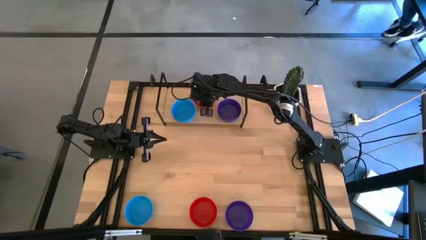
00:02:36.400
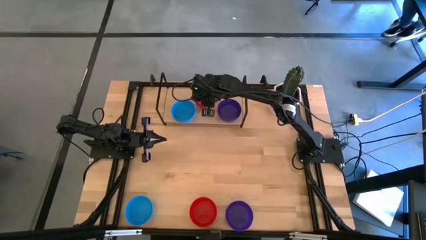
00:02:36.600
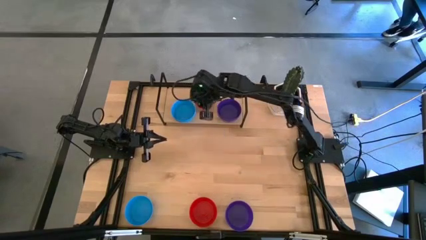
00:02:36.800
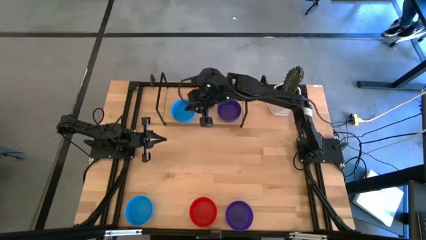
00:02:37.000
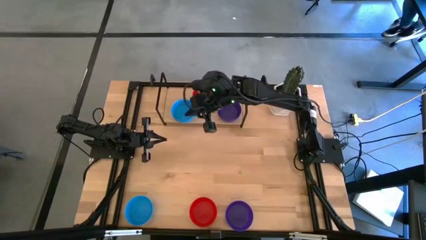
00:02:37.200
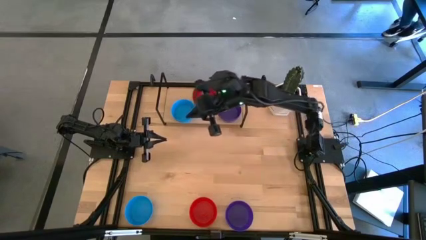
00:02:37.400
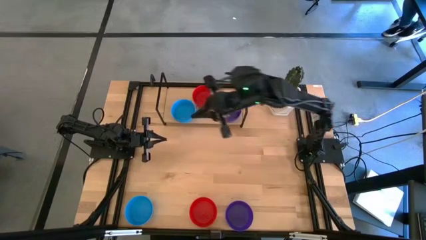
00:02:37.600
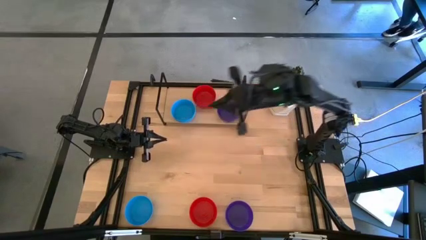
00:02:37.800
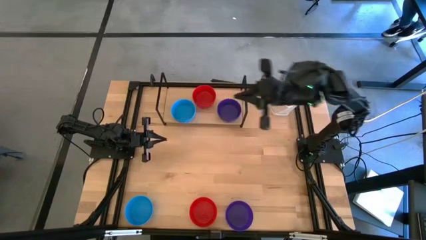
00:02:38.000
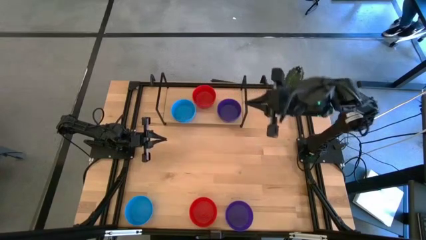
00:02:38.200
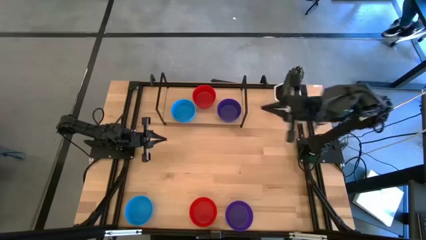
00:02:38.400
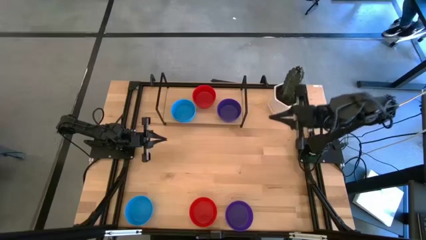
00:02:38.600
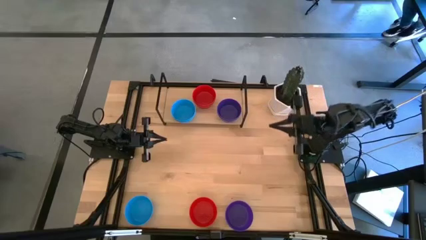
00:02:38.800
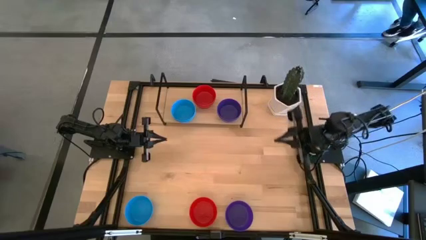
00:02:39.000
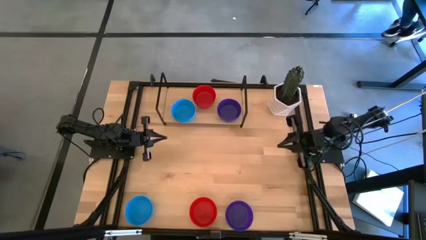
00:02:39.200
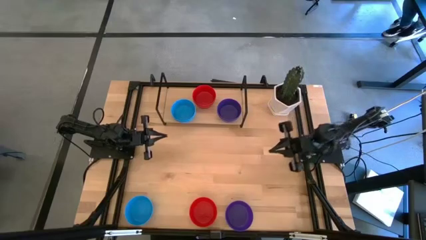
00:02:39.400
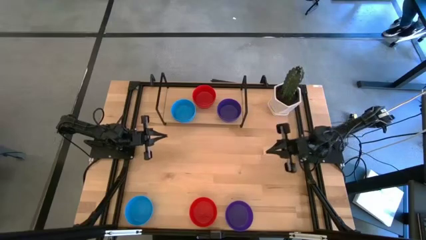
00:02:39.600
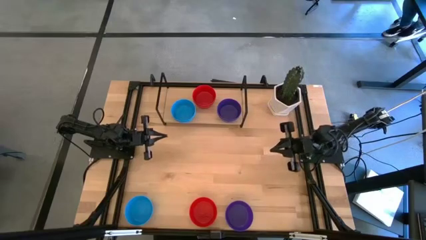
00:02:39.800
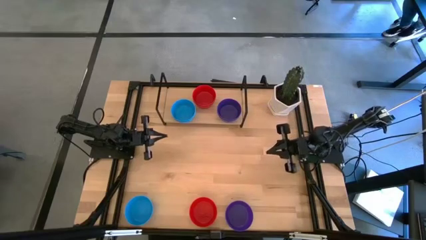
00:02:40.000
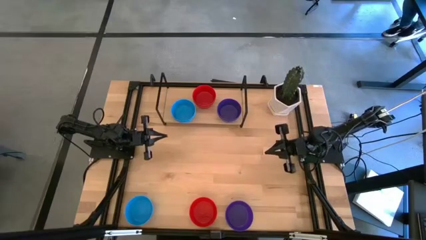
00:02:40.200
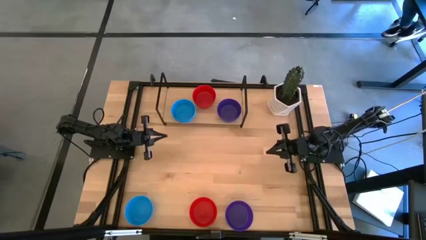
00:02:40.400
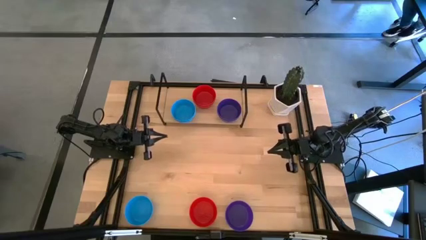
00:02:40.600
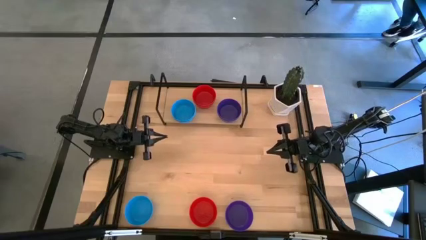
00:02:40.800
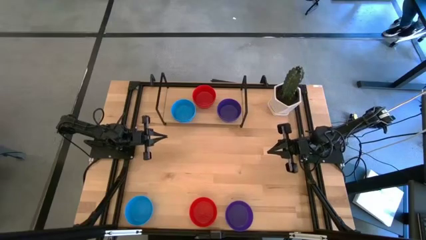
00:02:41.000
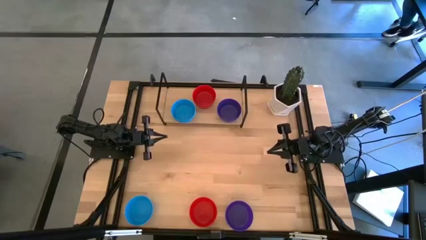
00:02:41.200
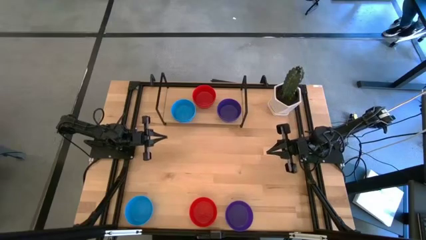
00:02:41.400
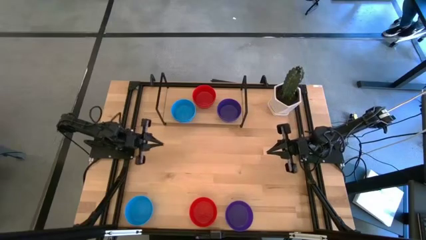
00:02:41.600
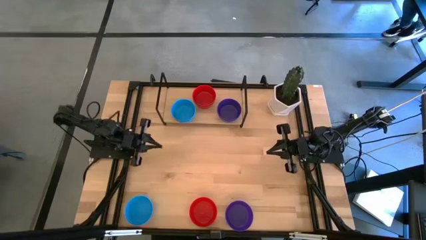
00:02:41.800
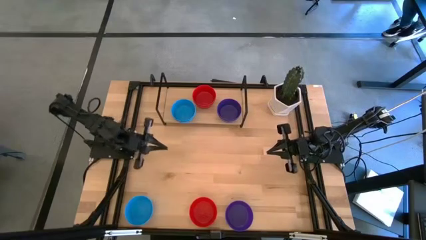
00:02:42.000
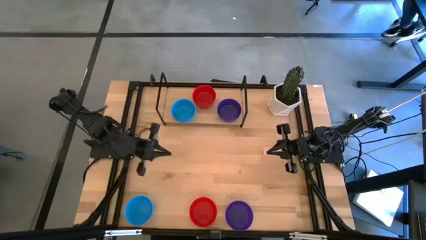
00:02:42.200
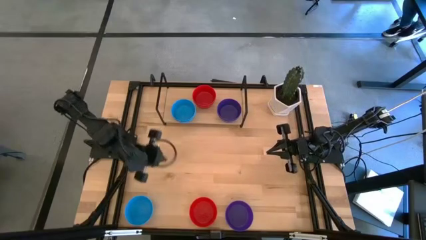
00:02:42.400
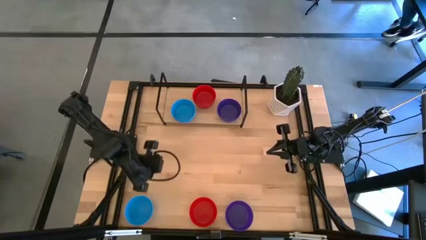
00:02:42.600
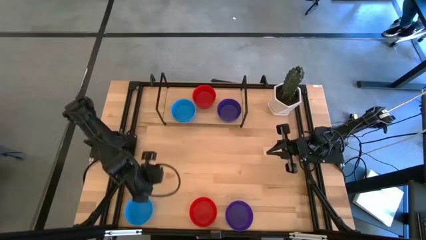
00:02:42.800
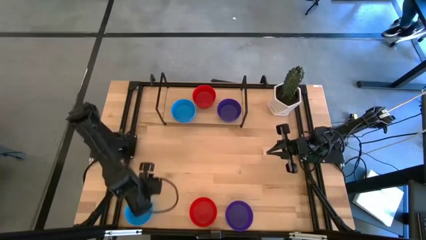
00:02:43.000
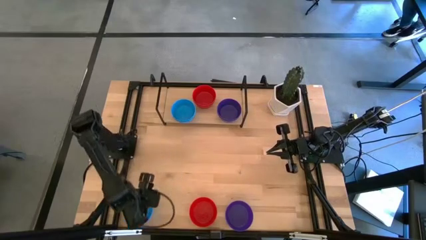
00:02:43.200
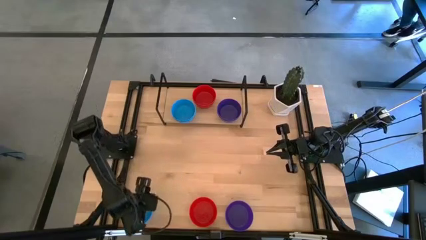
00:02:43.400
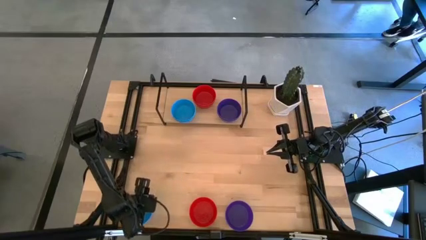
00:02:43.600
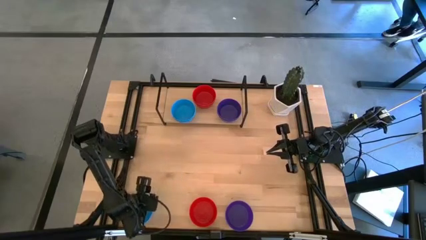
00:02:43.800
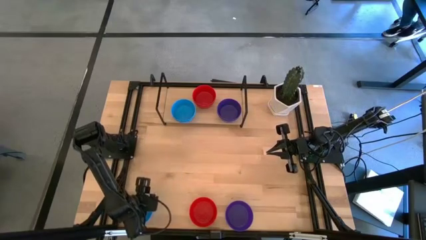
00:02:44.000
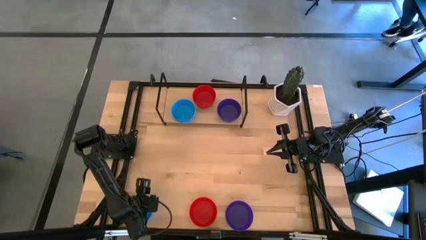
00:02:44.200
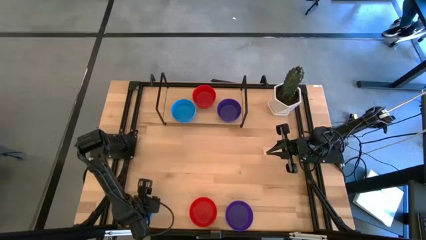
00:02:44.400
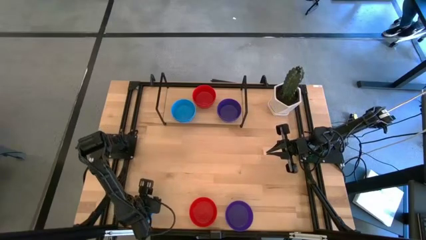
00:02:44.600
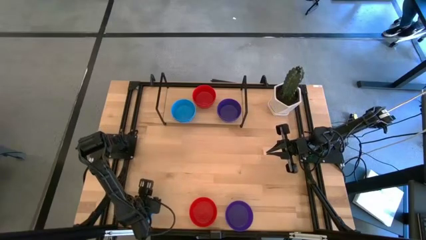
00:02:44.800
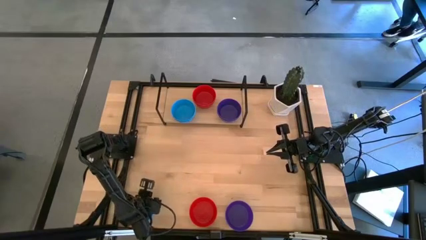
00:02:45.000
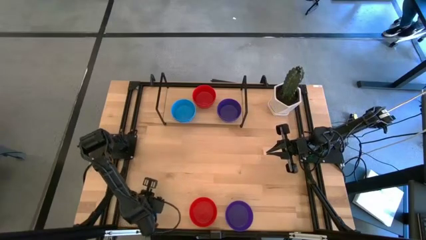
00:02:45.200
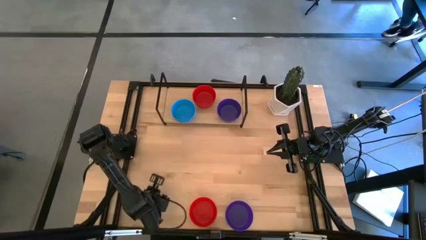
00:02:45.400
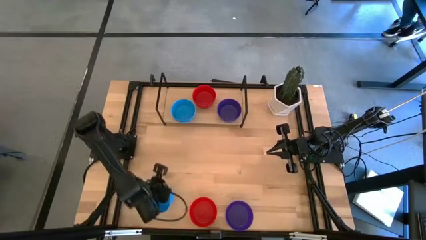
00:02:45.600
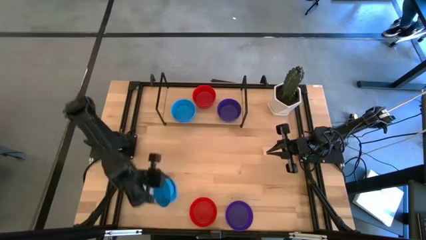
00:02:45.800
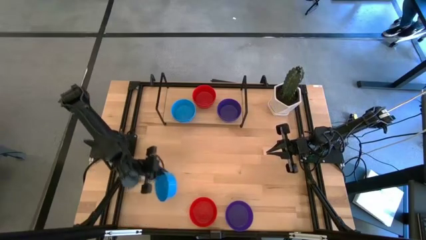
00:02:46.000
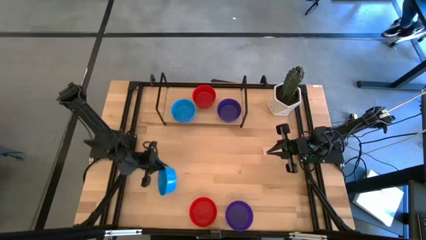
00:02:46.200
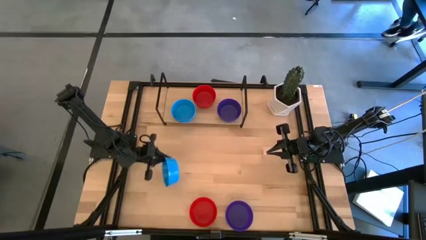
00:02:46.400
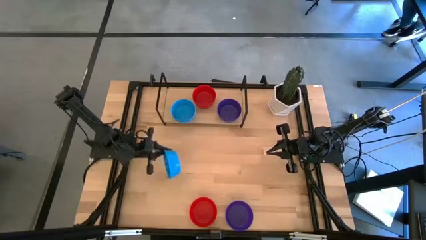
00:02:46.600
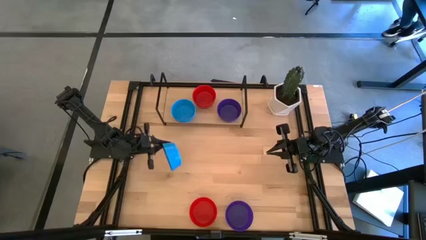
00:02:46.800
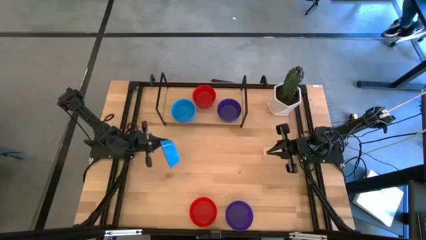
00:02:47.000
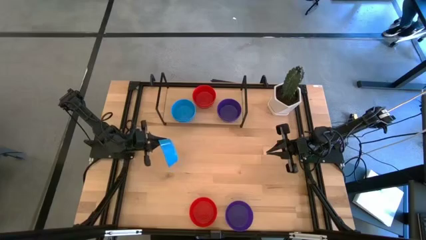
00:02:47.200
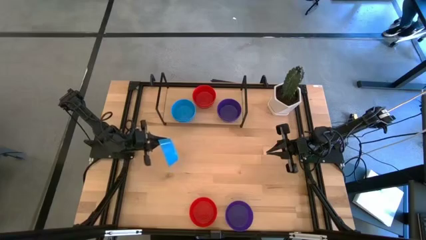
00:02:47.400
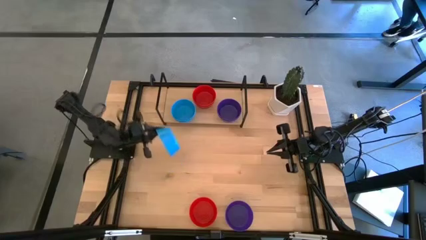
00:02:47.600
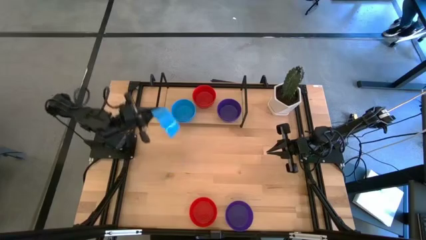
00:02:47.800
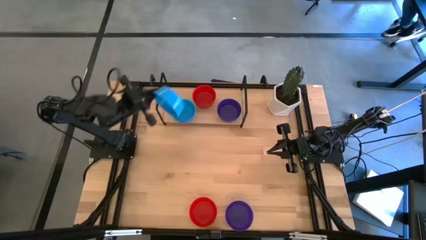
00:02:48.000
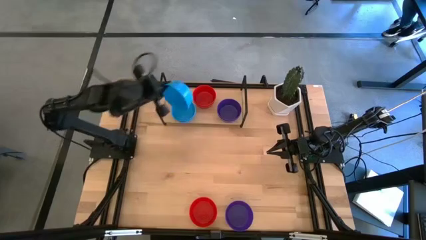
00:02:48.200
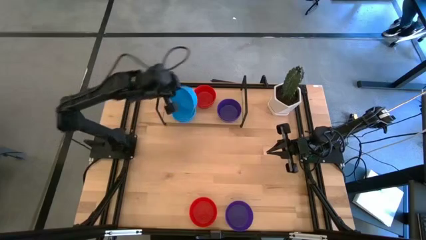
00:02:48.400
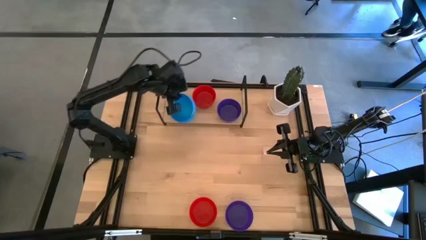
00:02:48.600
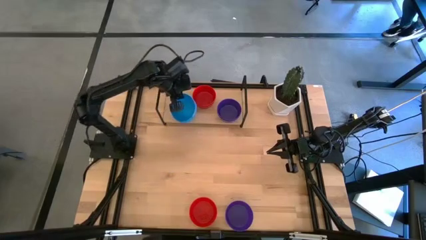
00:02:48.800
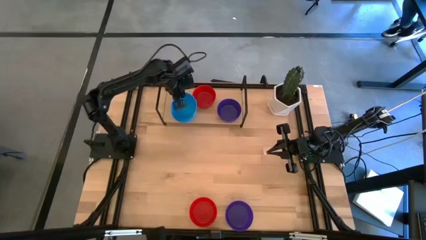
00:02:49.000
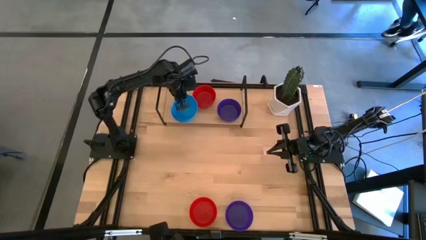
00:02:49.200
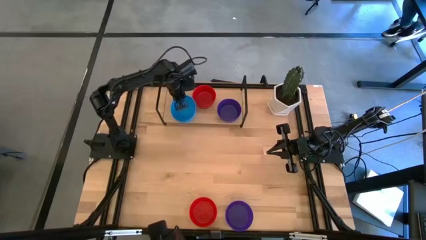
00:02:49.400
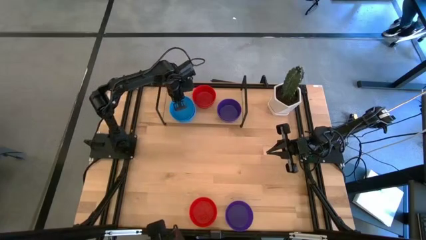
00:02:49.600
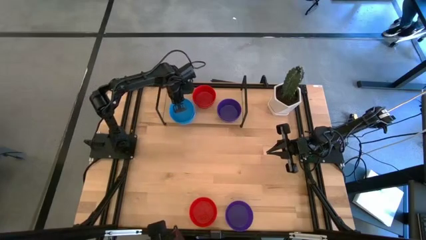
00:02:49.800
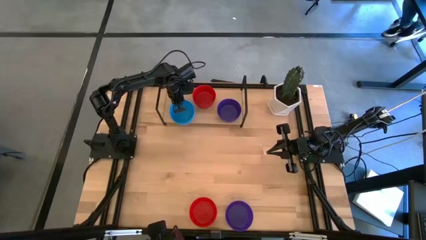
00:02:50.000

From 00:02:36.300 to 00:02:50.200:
Task: Pick & Place Mini bowls
Stack the blue bowl on top of the blue bowl on the shelf

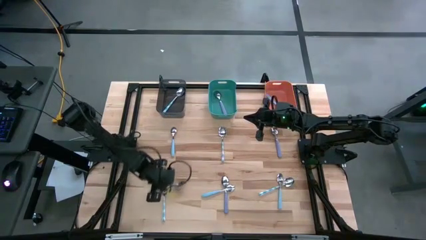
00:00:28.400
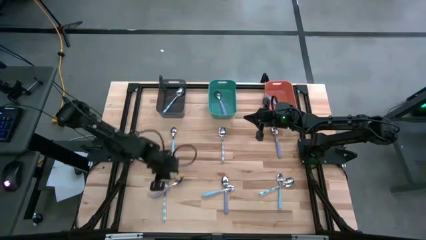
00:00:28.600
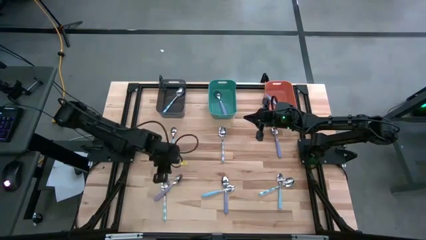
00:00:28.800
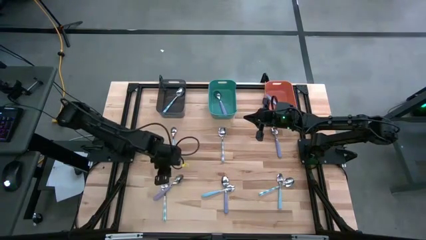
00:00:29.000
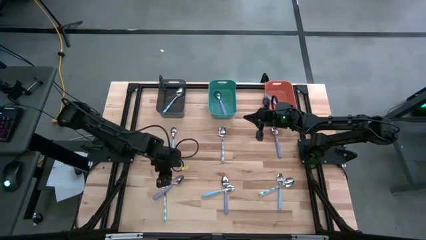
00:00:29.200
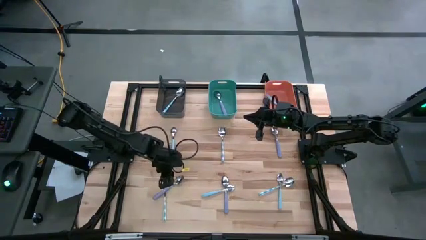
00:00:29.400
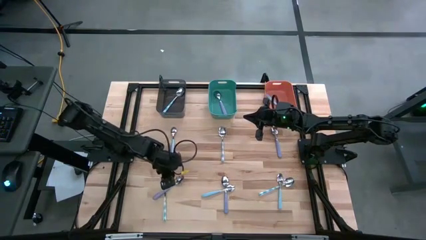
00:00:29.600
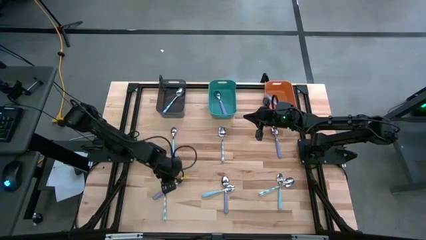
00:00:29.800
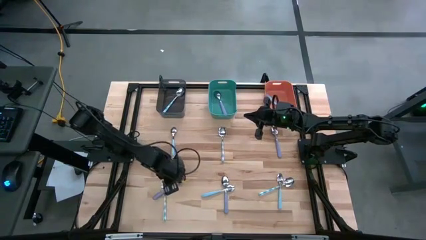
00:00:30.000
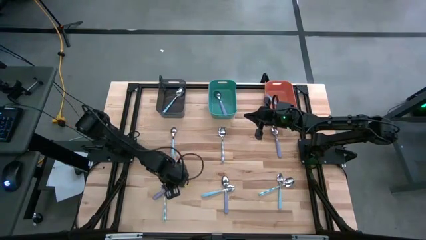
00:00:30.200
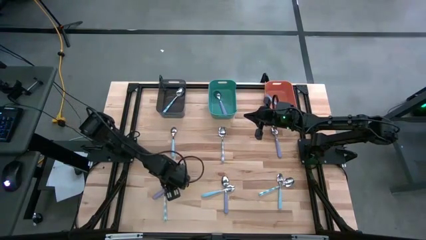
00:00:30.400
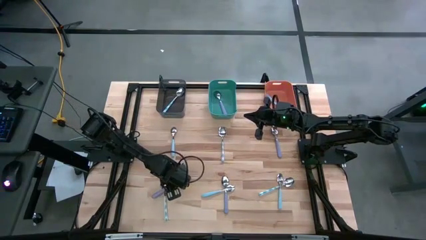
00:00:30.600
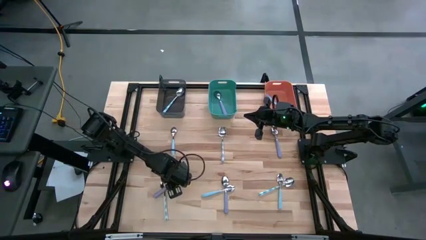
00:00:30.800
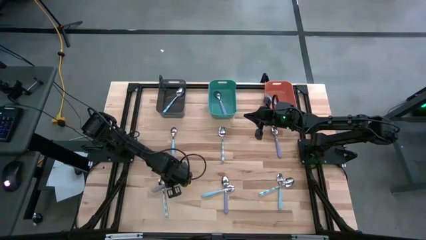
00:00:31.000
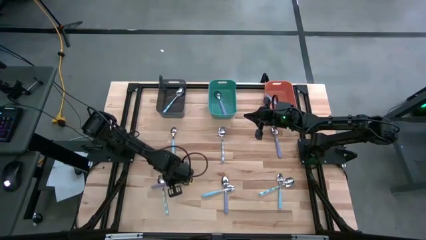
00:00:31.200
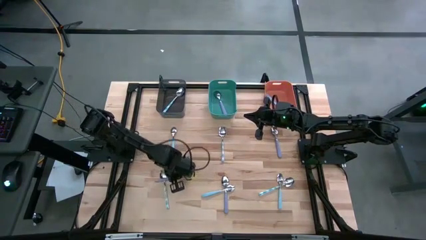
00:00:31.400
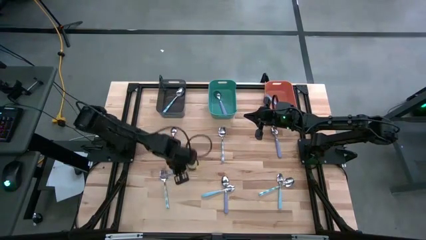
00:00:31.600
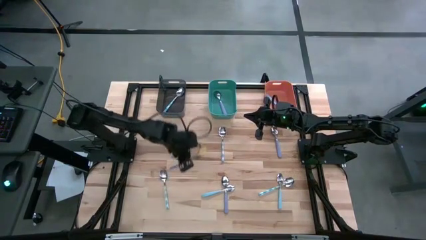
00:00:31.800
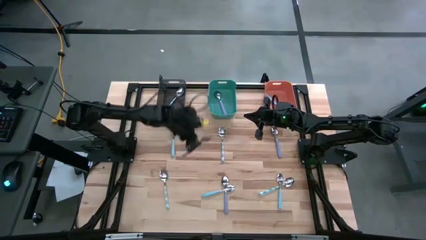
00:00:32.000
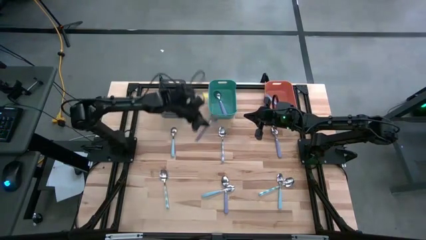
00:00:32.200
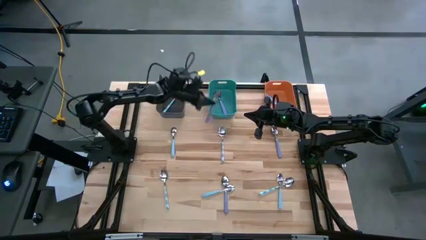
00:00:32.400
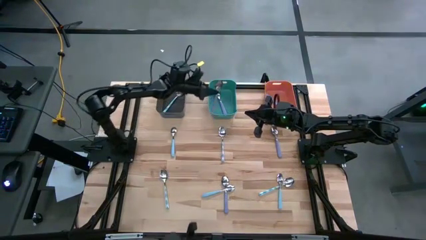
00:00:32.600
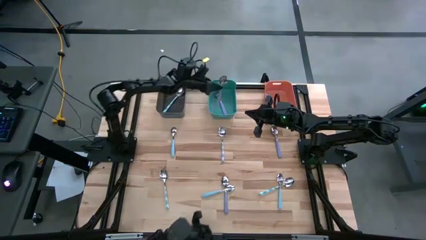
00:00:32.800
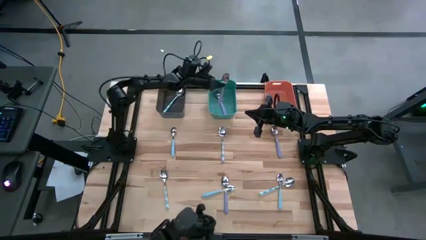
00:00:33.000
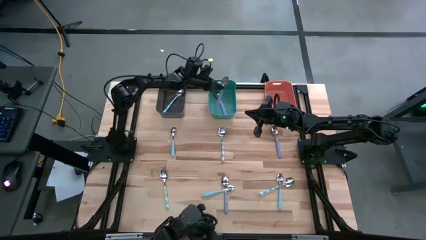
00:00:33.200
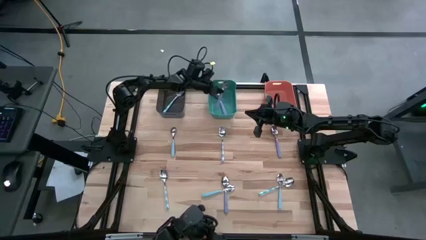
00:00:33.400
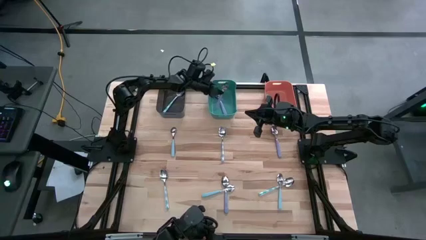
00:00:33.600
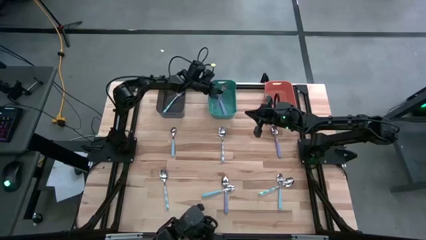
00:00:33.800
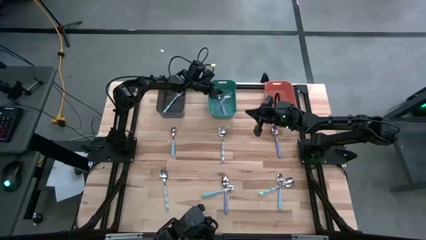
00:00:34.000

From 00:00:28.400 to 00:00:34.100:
Task: Sort silverware by color (type)
Put the bottom left purple spoon into the green bin
